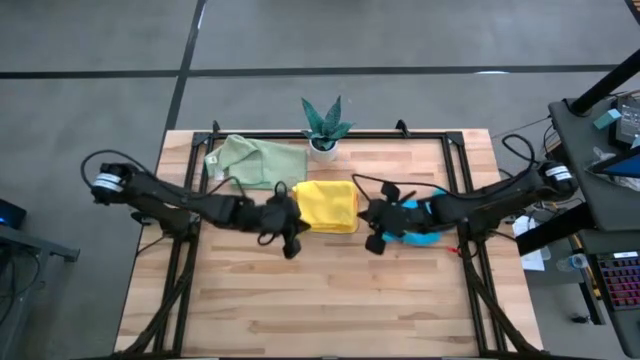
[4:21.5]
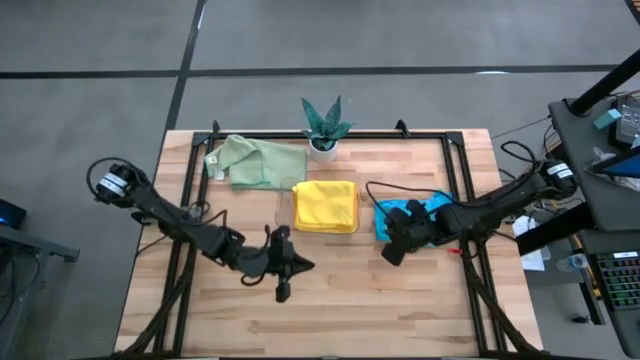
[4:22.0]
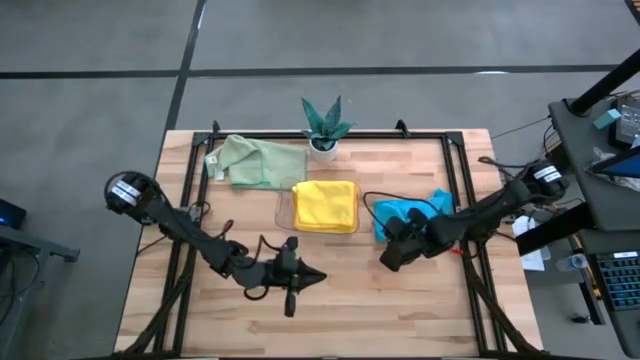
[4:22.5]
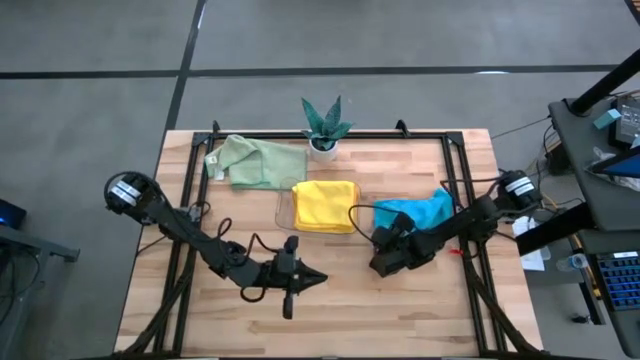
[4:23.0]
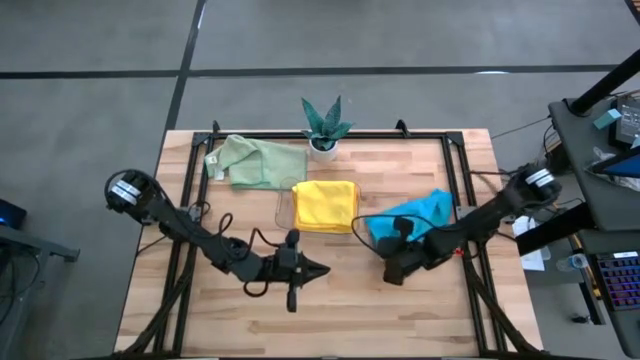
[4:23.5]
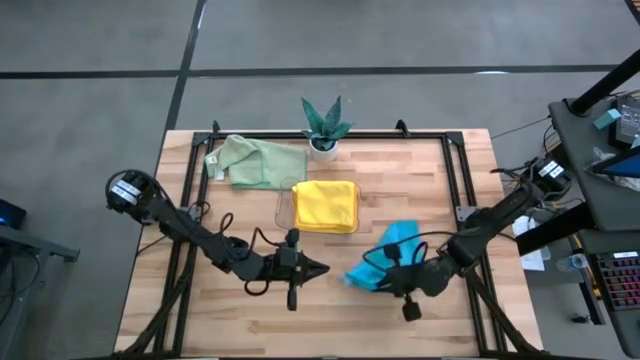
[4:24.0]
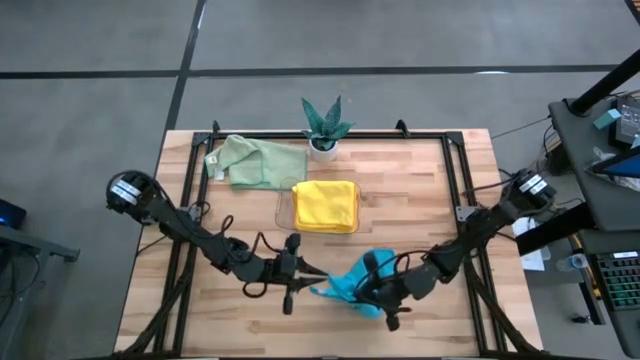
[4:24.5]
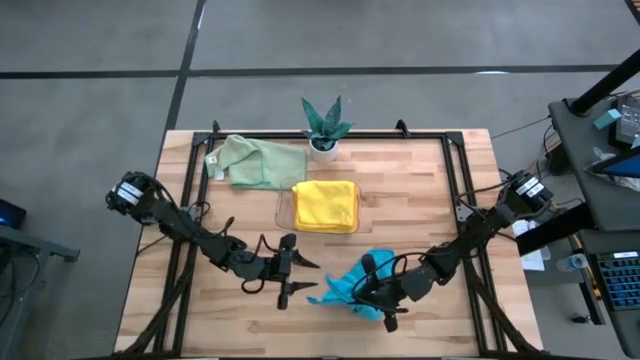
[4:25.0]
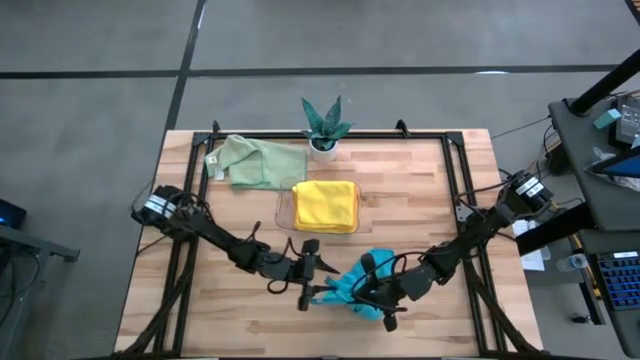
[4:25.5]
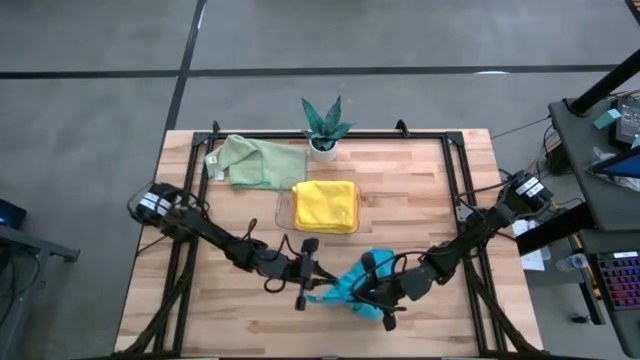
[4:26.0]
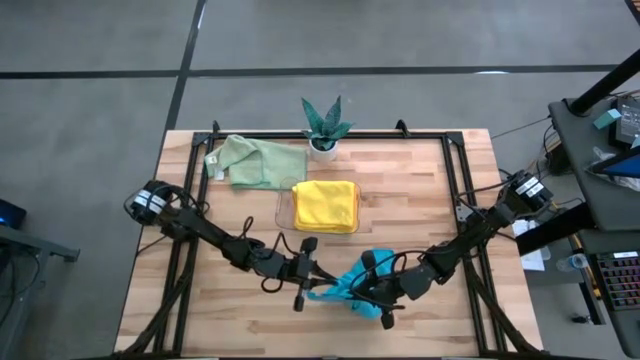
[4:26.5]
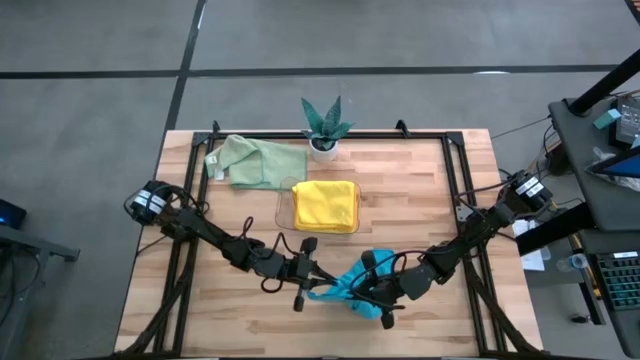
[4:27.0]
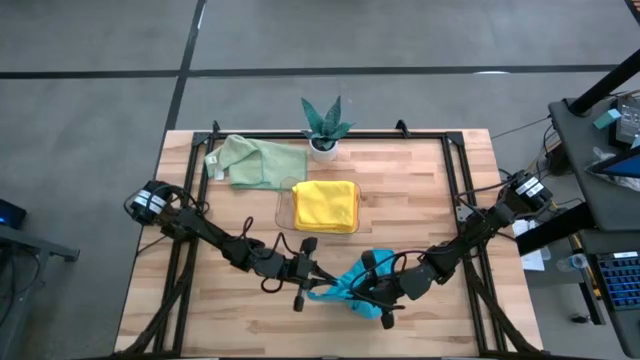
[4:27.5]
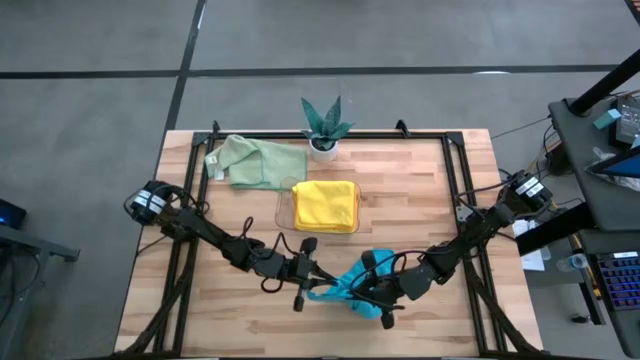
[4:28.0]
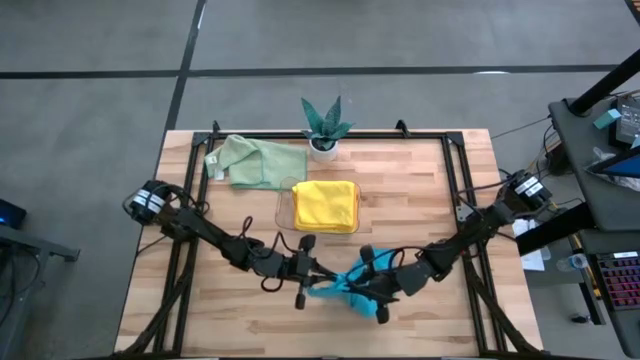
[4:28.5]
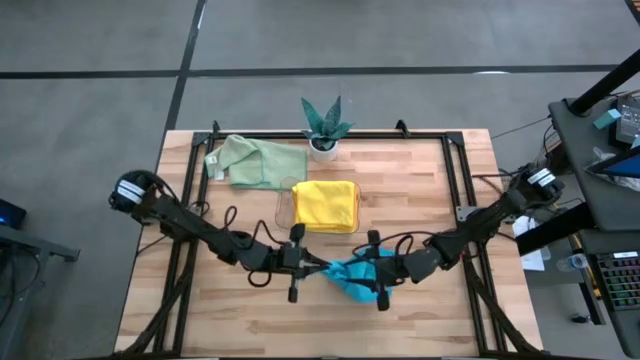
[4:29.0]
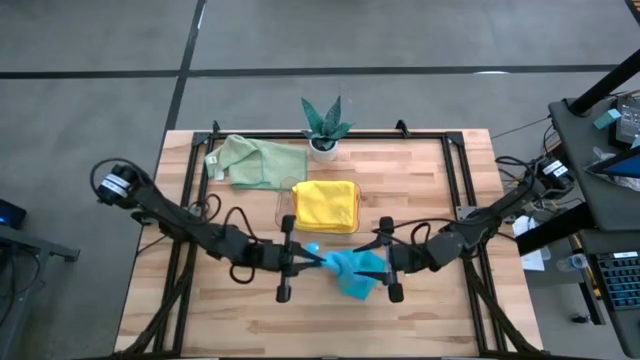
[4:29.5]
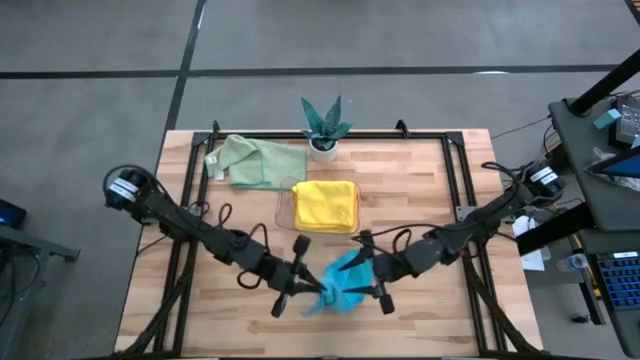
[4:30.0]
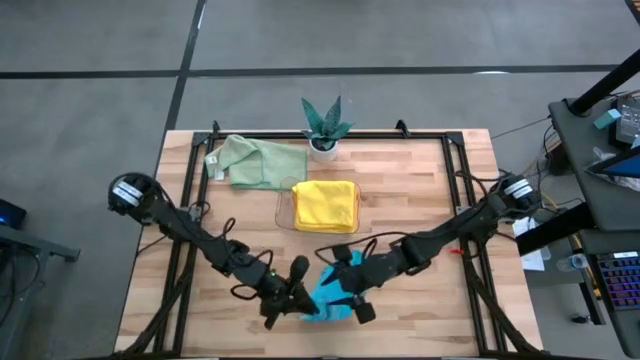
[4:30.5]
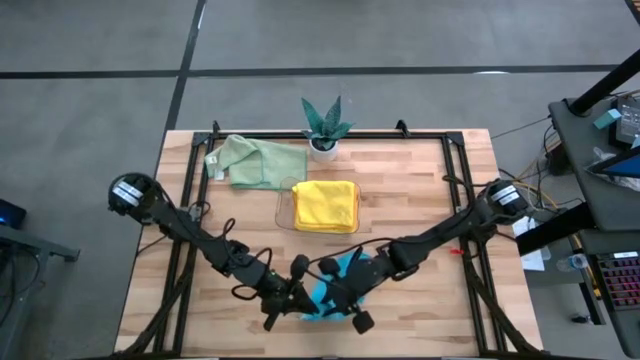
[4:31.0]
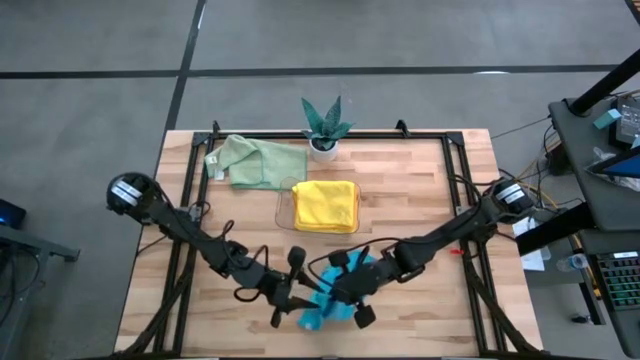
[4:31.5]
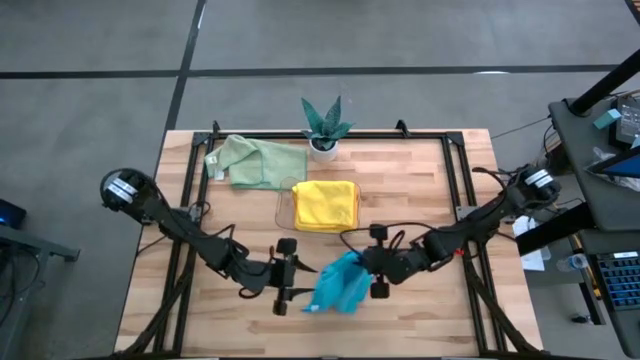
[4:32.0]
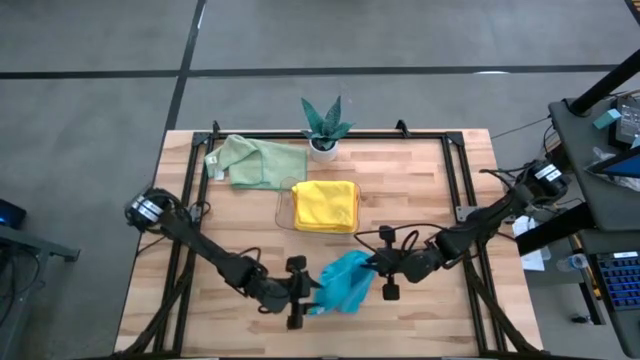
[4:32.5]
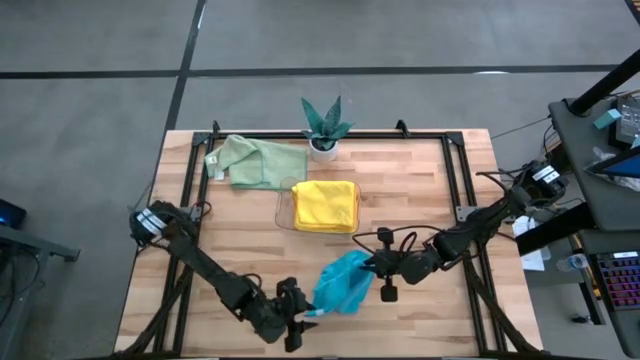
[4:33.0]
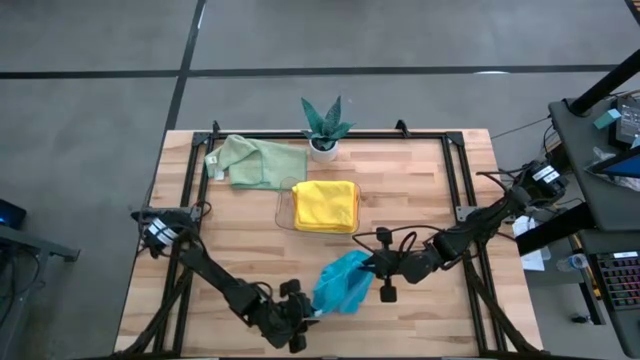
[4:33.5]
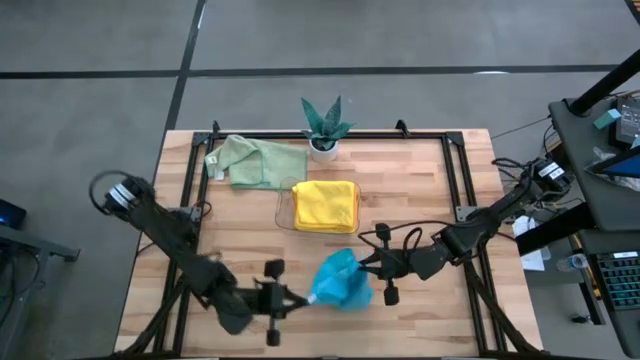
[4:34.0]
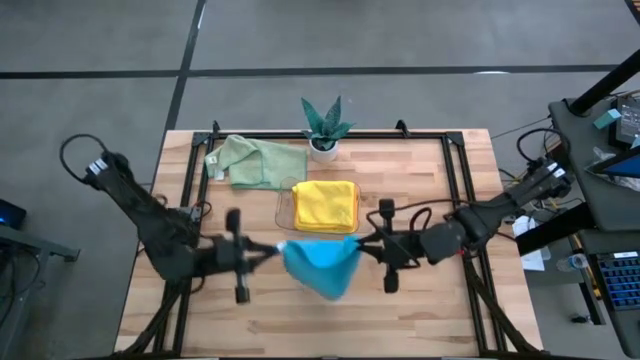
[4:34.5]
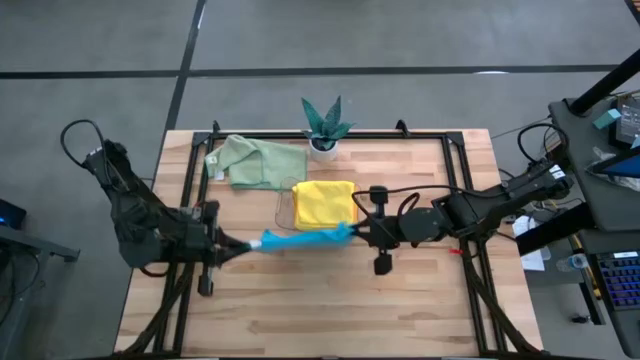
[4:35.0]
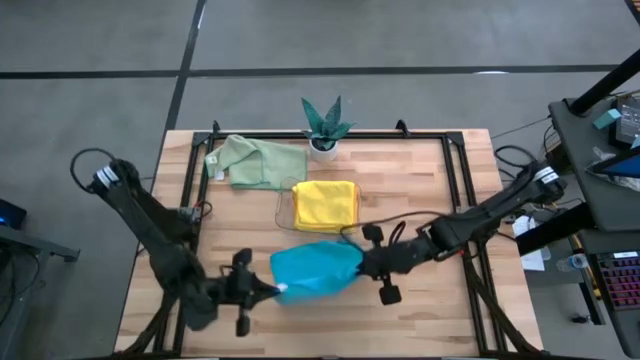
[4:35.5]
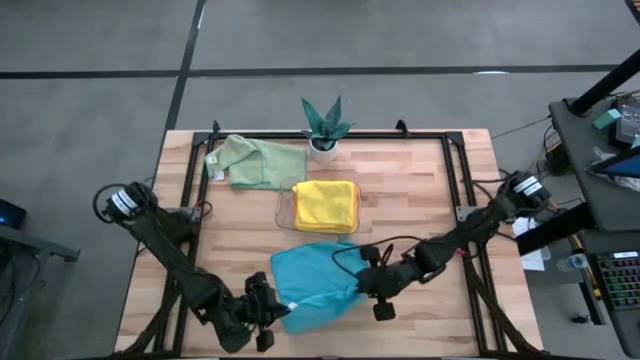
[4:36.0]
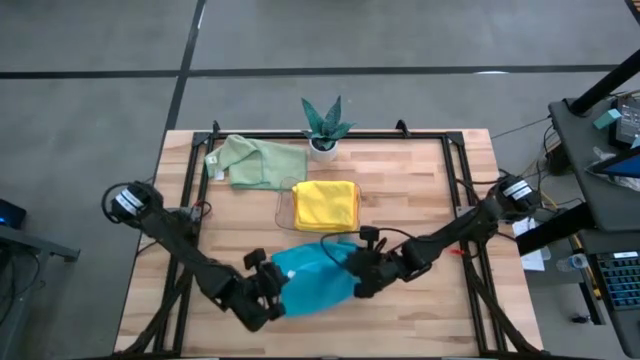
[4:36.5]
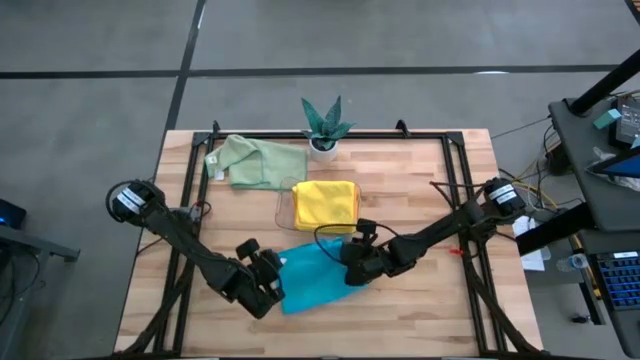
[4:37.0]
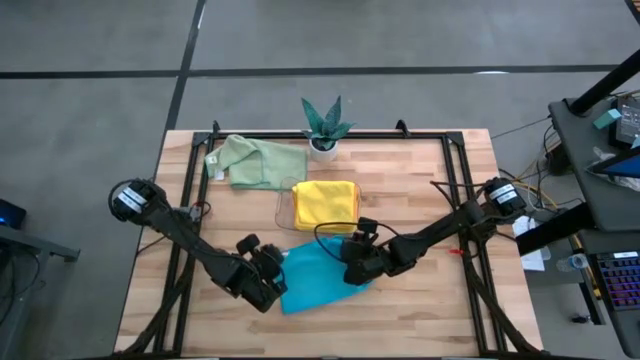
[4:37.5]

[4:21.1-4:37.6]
Task: Fold microfiber towels
Fold the blue microfiber towel
